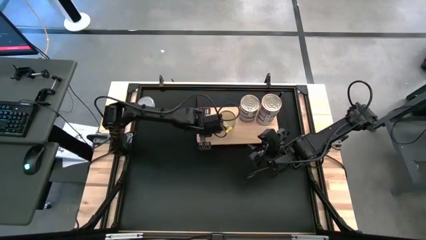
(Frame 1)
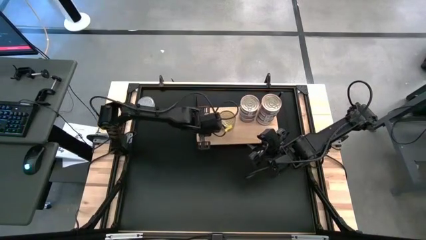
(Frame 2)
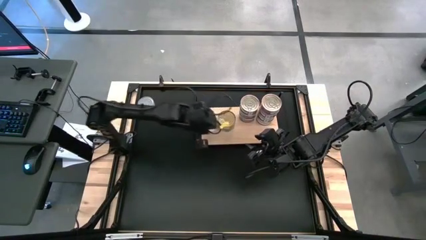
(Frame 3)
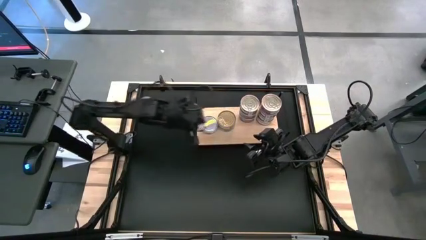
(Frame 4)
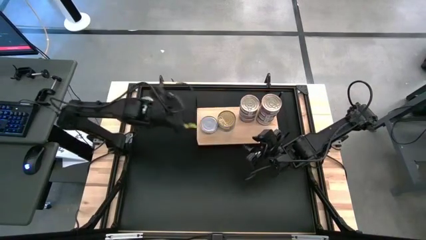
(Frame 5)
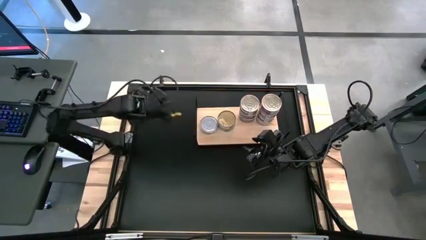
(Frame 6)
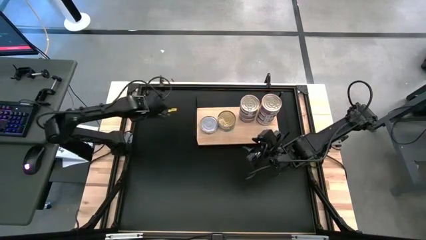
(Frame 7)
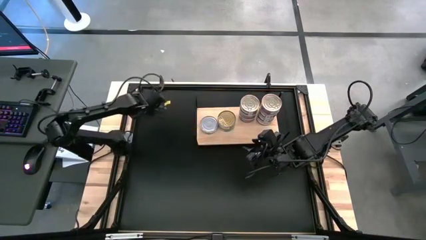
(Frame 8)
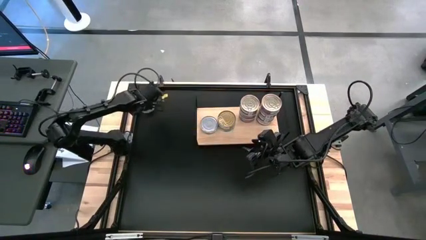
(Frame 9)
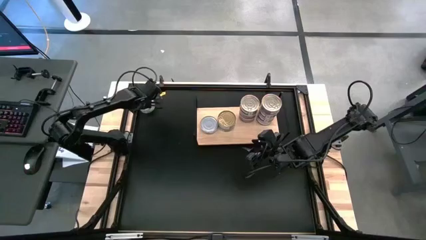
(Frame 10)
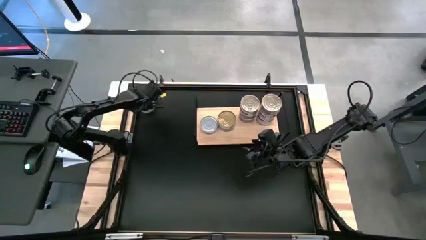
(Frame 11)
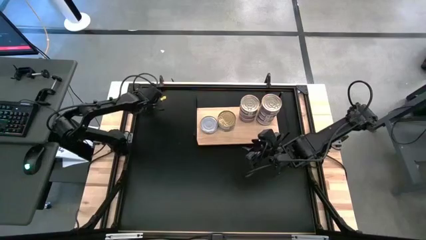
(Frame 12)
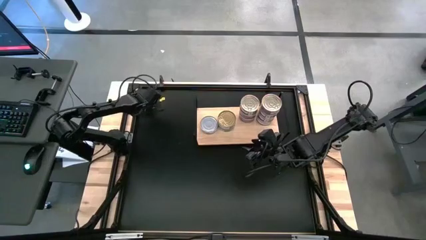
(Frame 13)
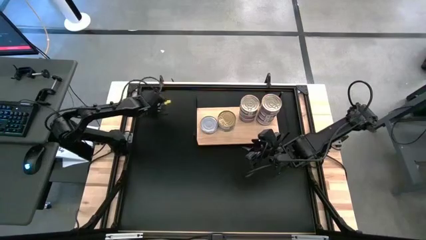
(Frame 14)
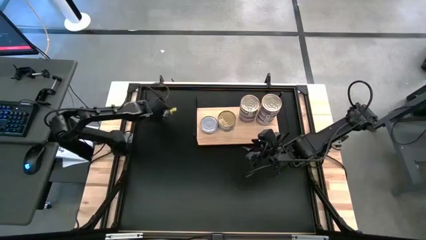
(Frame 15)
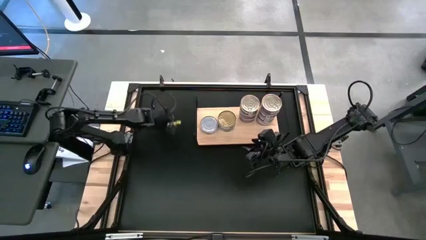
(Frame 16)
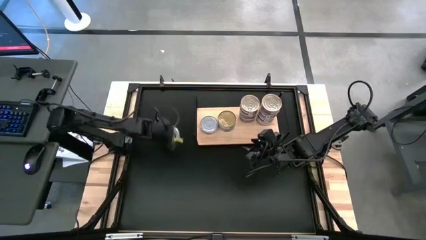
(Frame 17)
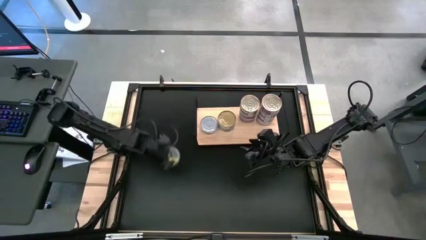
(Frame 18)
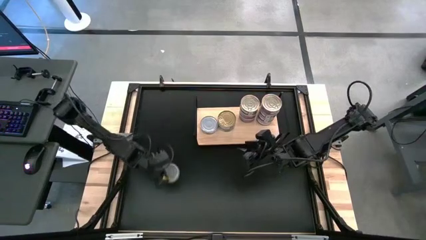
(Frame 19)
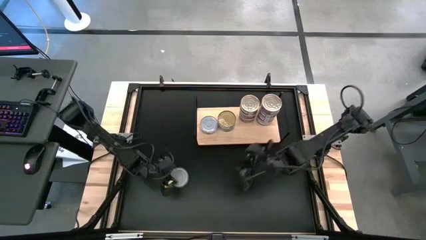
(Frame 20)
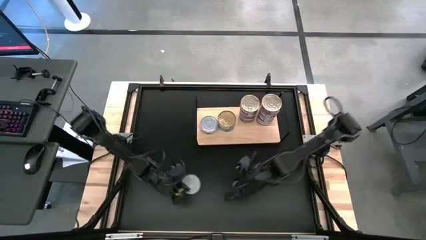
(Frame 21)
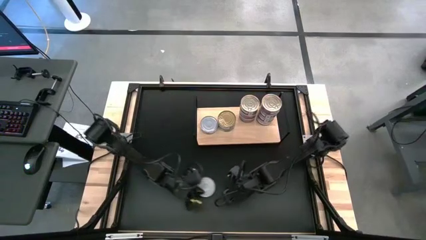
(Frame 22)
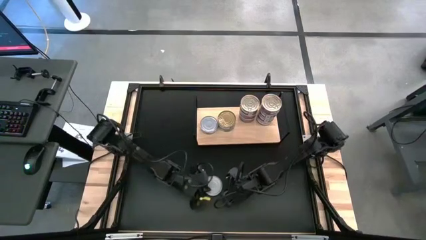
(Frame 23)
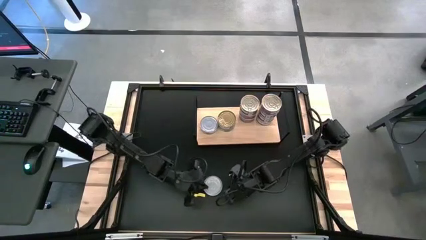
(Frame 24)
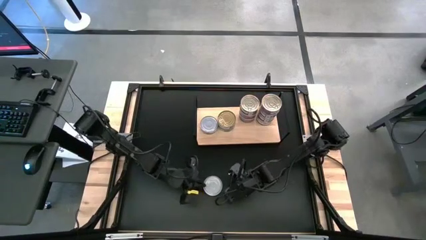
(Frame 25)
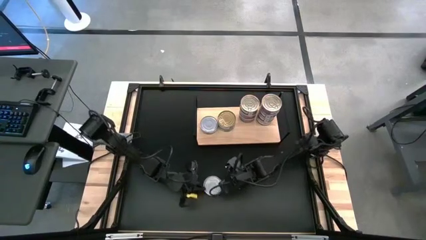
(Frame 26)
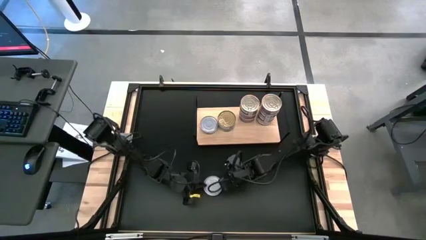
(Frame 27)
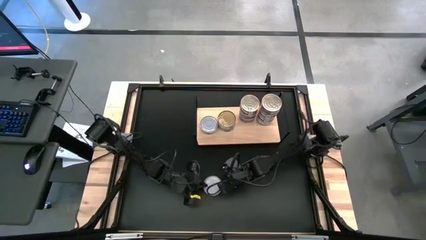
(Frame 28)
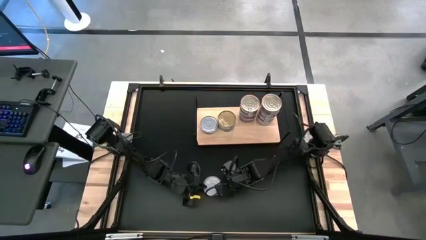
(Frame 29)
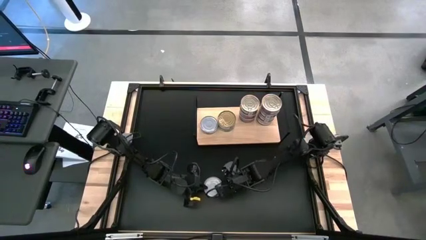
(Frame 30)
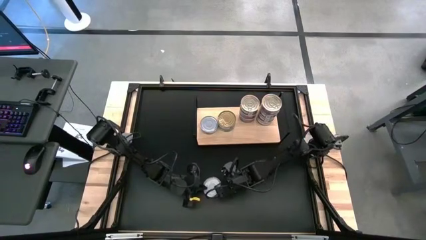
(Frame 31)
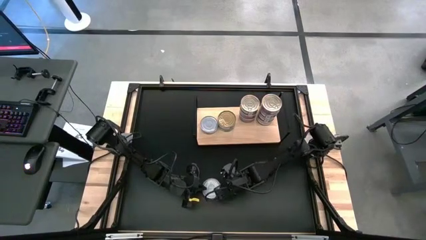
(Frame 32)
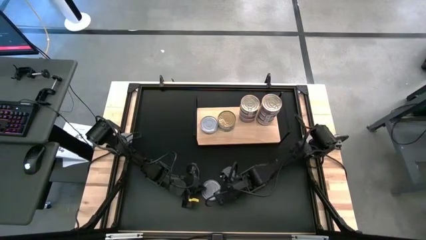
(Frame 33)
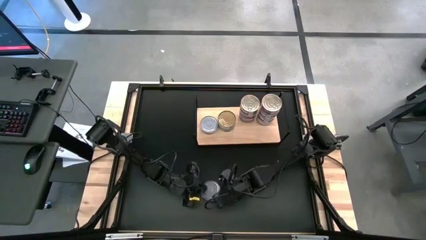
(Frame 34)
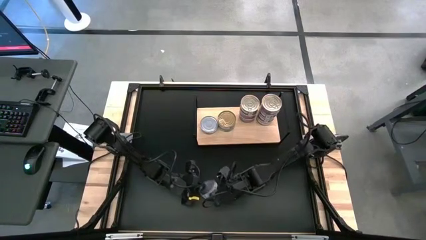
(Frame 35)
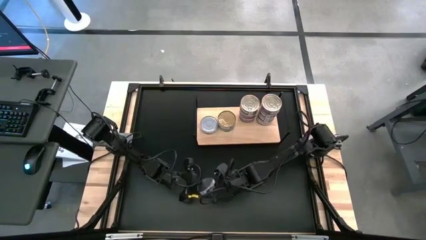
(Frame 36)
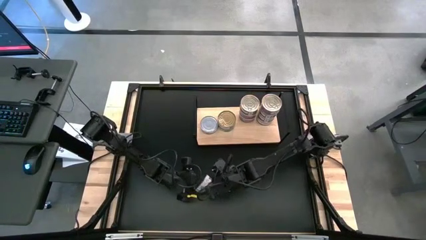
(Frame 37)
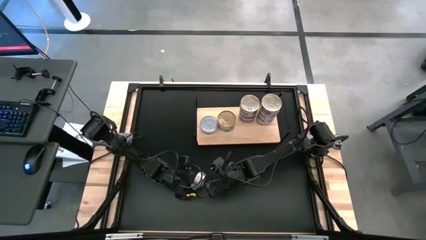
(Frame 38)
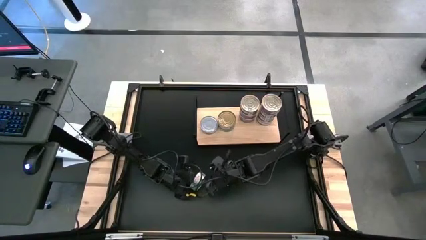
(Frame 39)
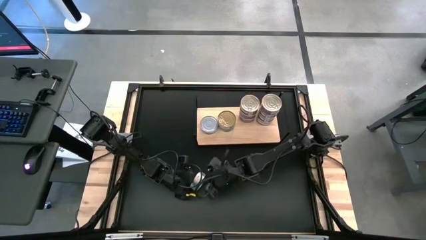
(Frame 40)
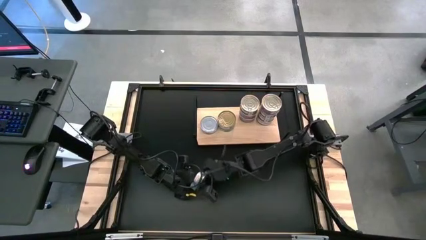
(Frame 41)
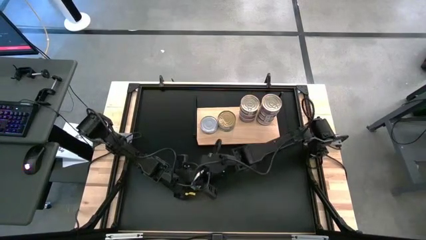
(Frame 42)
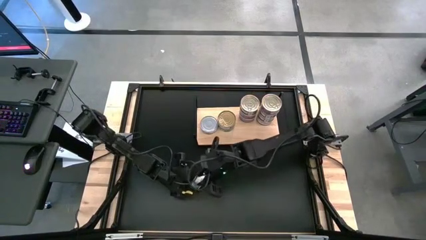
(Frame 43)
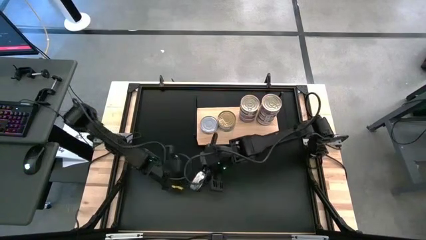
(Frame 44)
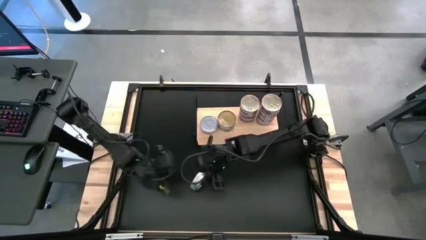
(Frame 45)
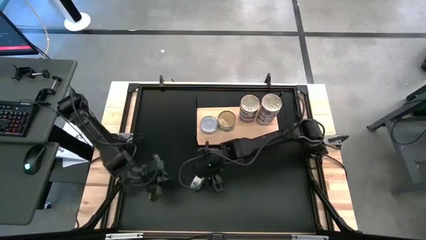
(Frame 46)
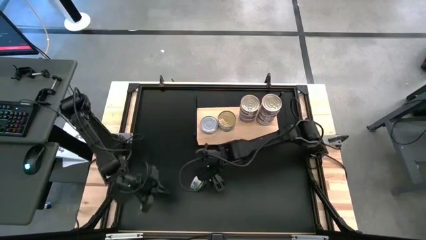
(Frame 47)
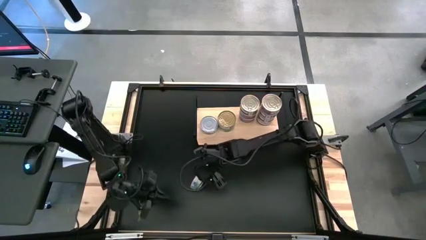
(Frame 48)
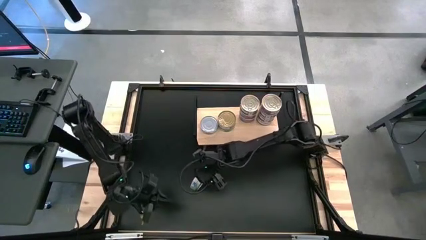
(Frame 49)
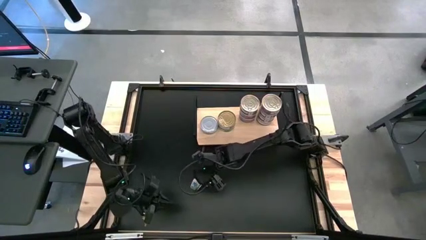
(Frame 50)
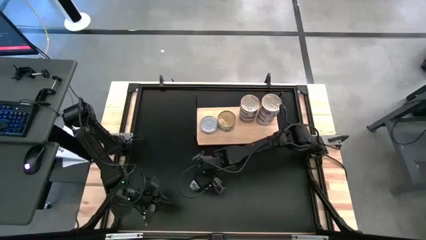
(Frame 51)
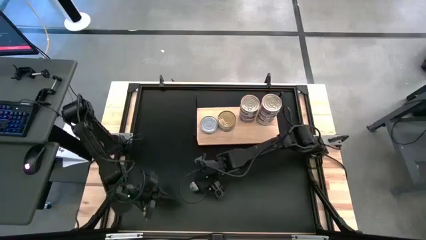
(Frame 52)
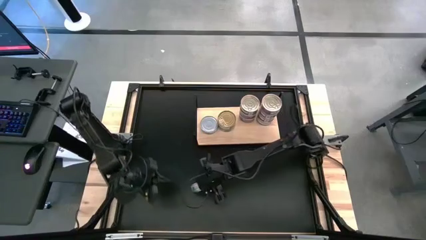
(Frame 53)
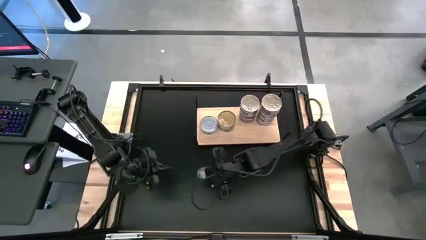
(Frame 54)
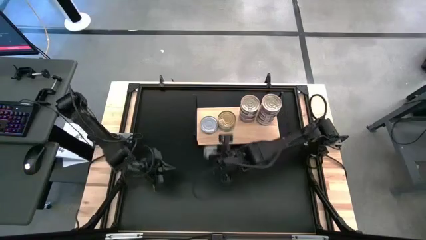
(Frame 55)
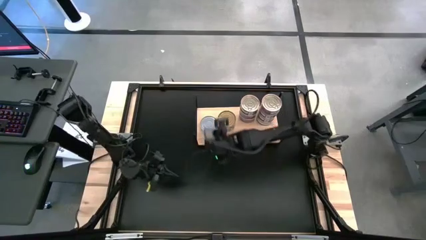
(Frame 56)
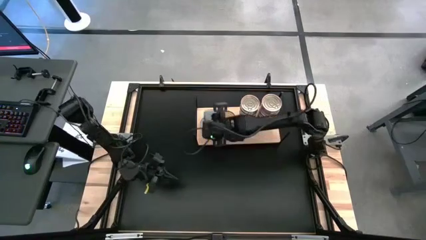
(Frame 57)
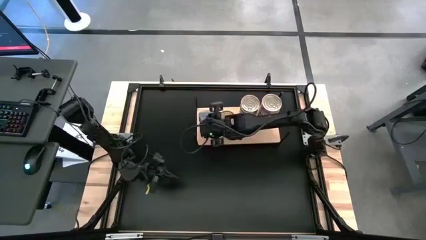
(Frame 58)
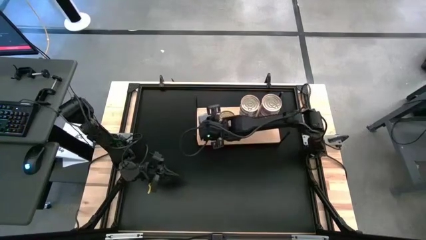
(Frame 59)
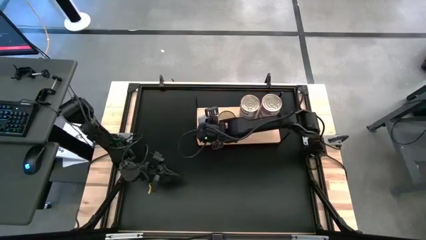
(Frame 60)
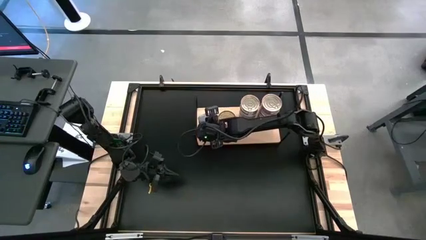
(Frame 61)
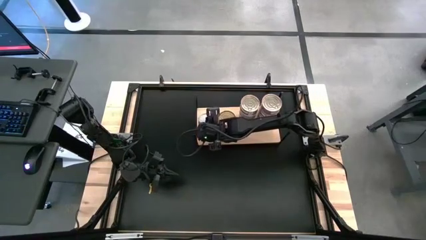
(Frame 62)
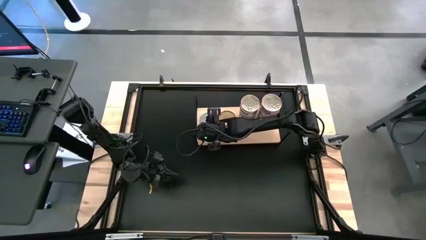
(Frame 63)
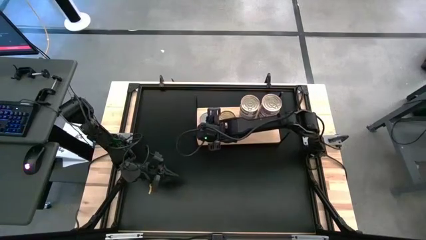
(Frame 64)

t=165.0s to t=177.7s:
Task: Stack canned seafood by type on shelf
Stack the green tuna can on top of the other green tuna can on the shelf

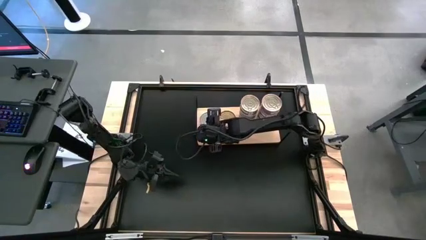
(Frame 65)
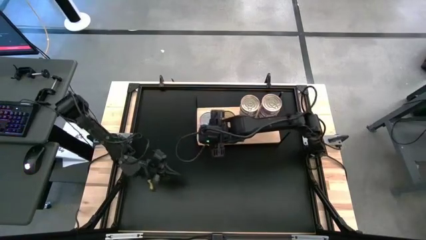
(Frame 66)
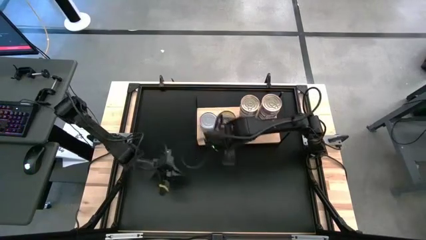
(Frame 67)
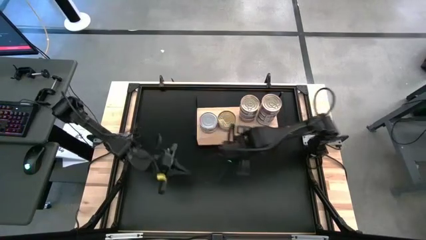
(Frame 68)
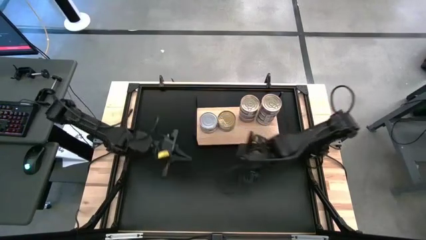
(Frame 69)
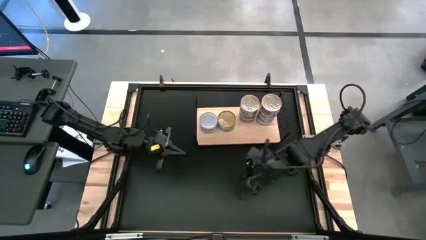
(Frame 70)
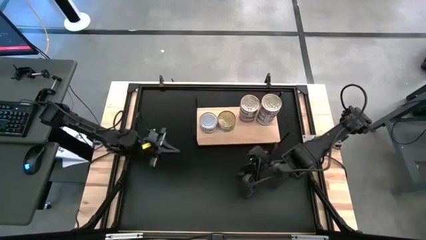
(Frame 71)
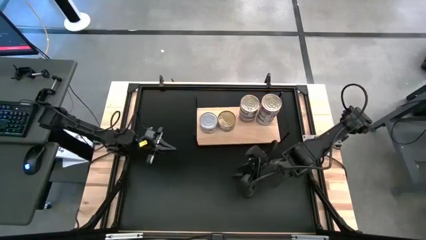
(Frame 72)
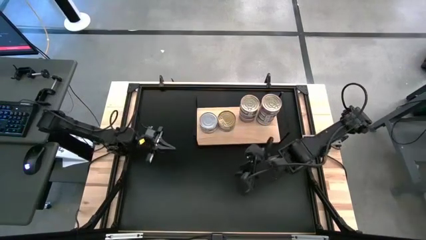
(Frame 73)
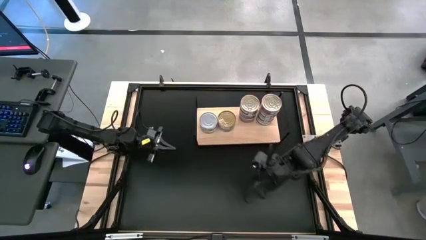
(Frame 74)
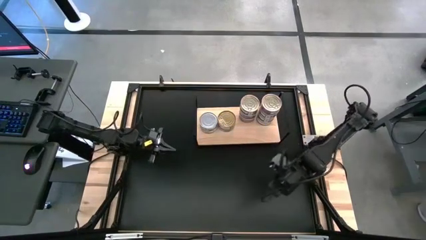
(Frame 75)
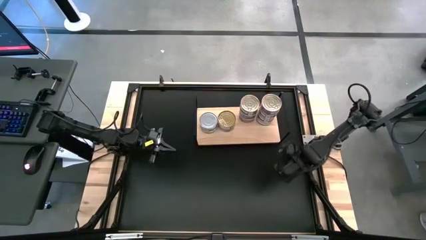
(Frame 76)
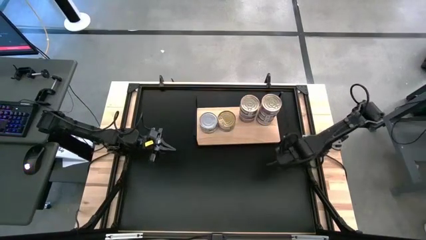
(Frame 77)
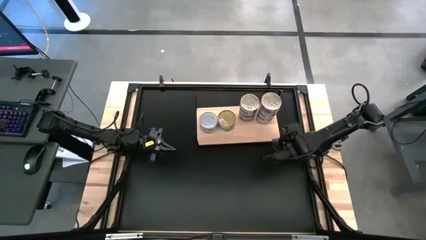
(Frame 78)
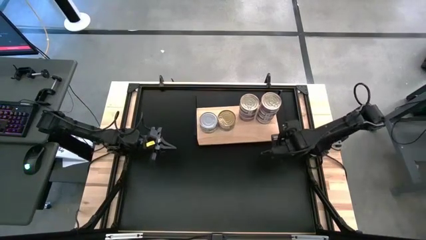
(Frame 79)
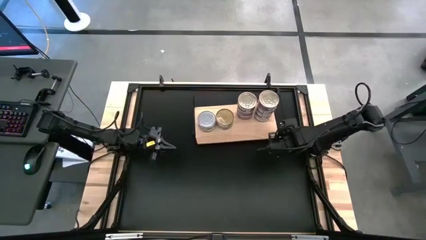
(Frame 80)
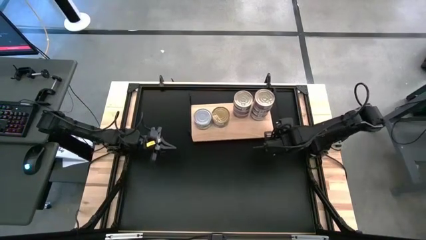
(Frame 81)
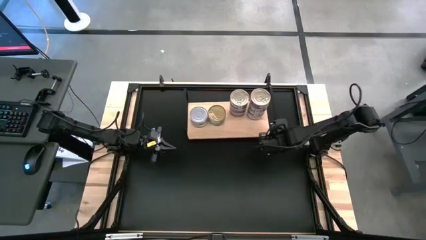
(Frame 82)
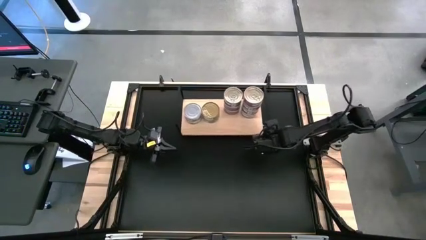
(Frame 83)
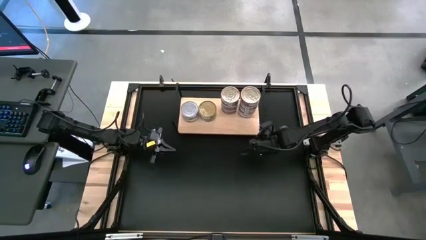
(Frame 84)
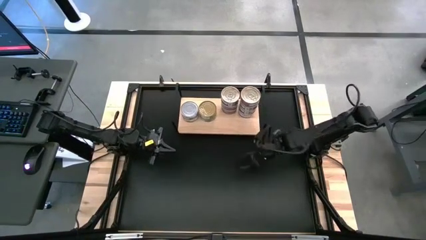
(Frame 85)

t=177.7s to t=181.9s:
Adjust the shelf
